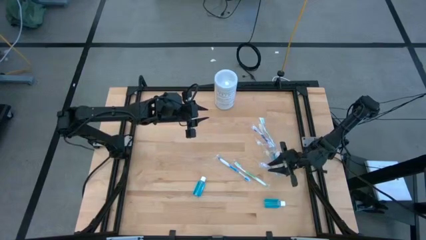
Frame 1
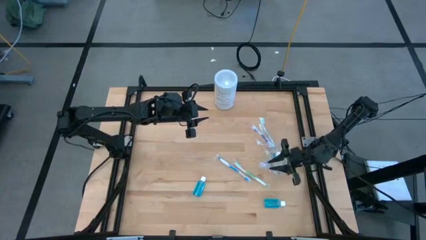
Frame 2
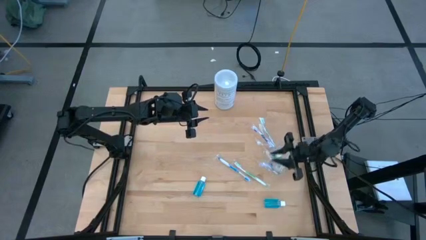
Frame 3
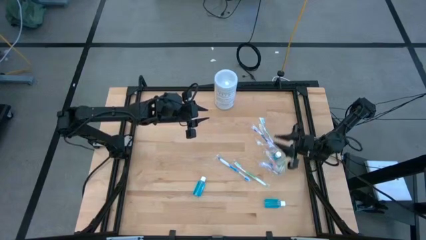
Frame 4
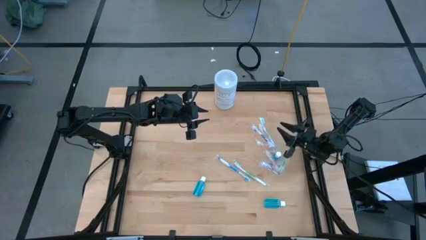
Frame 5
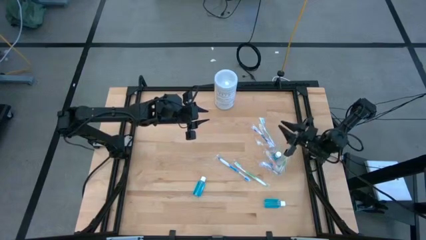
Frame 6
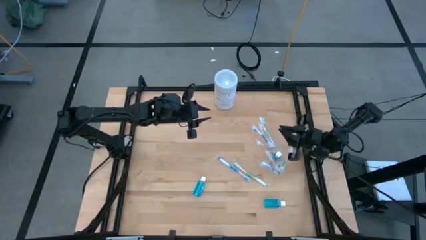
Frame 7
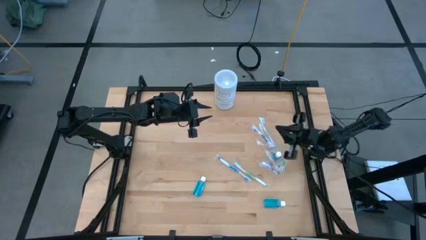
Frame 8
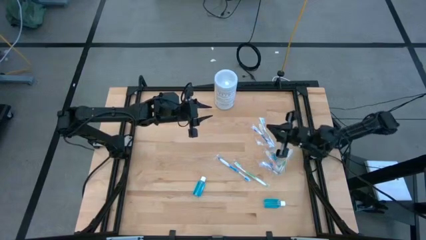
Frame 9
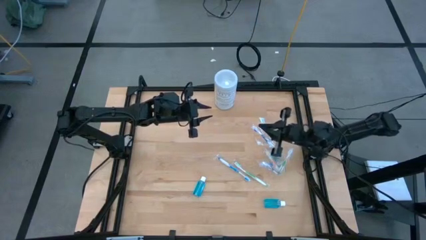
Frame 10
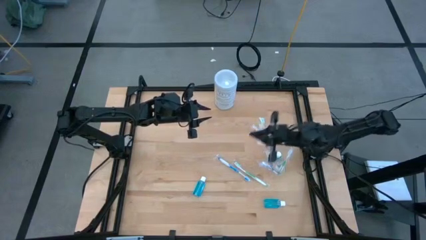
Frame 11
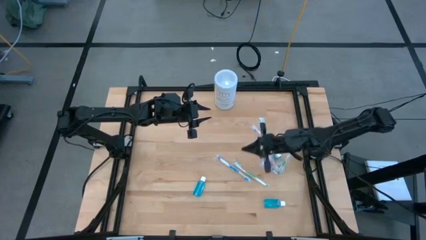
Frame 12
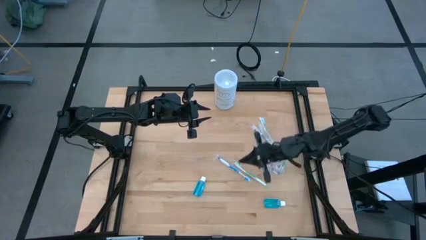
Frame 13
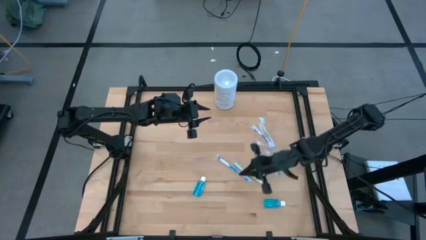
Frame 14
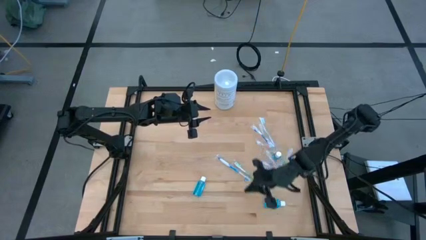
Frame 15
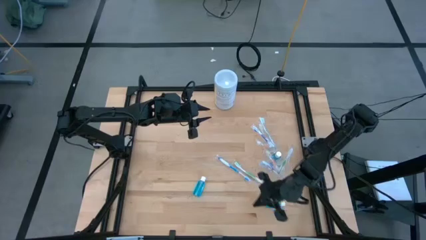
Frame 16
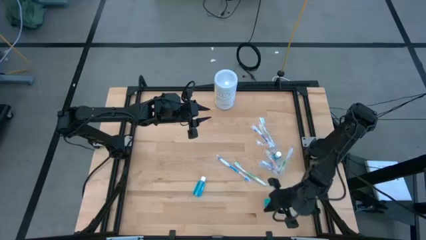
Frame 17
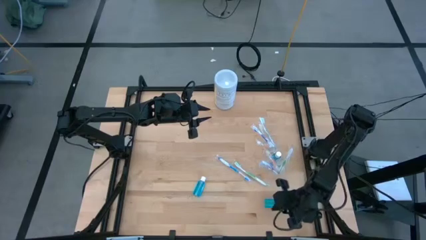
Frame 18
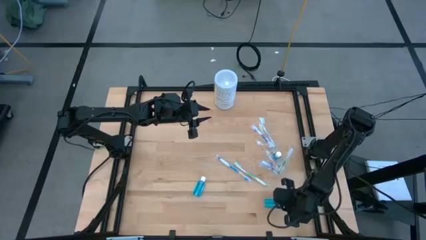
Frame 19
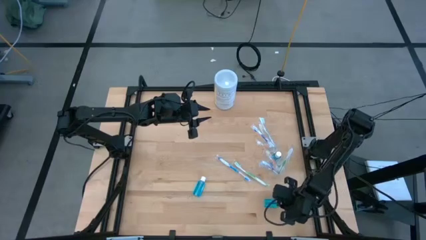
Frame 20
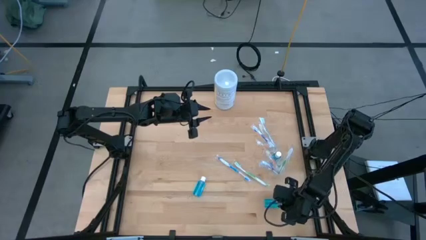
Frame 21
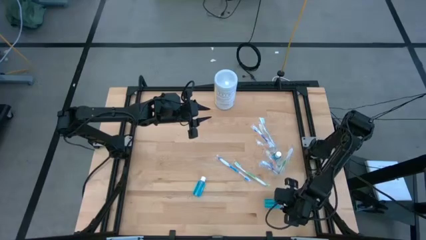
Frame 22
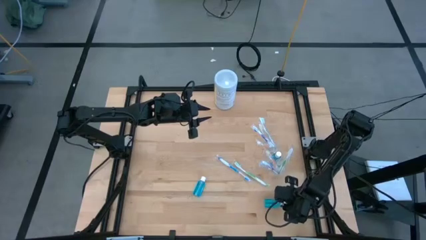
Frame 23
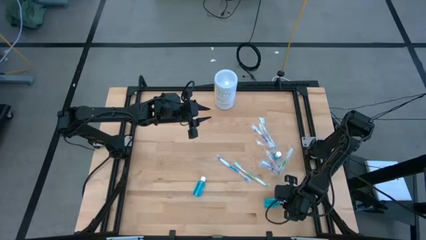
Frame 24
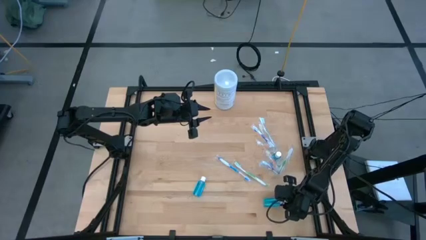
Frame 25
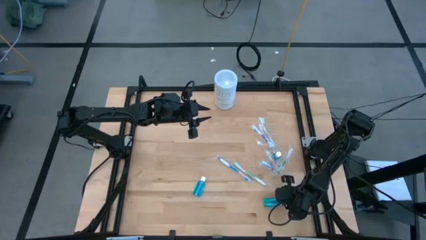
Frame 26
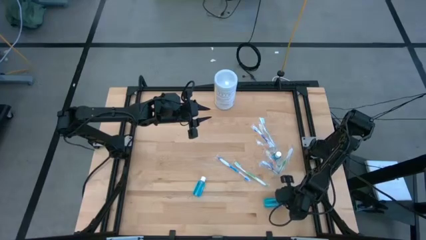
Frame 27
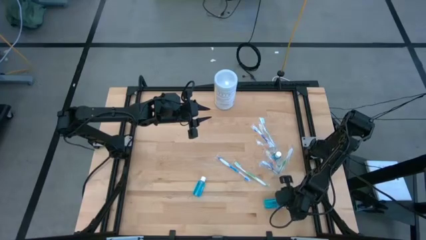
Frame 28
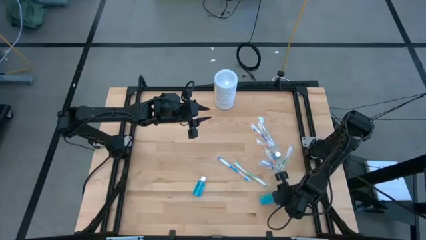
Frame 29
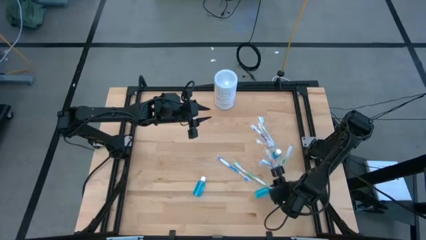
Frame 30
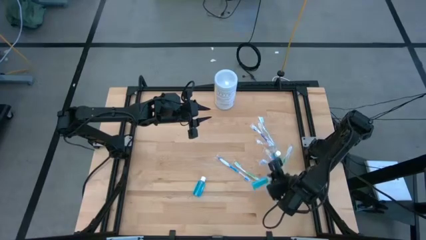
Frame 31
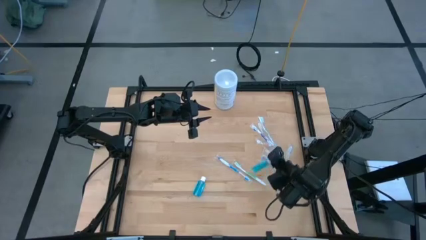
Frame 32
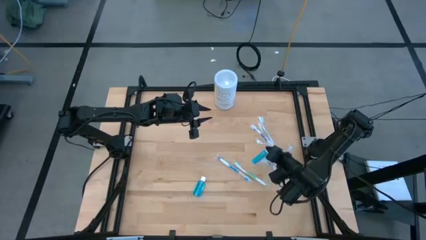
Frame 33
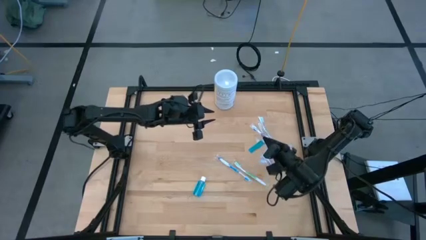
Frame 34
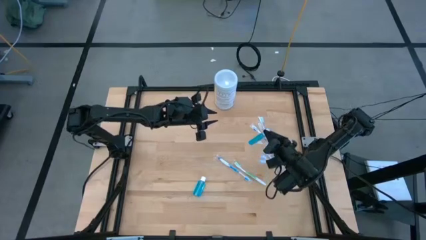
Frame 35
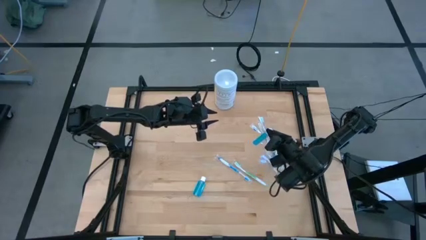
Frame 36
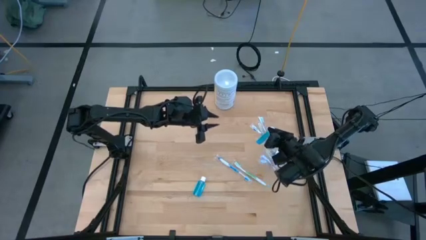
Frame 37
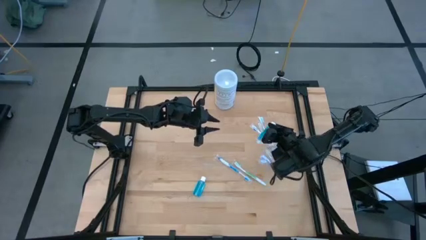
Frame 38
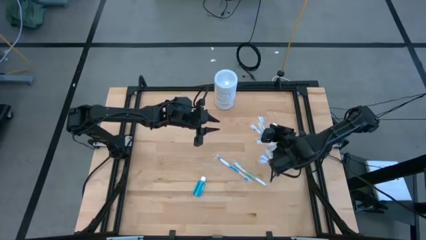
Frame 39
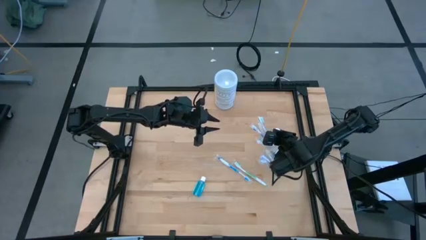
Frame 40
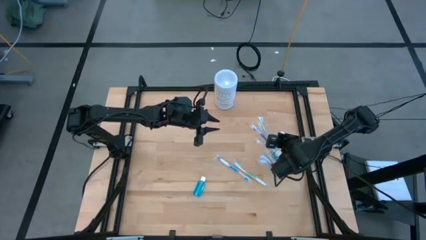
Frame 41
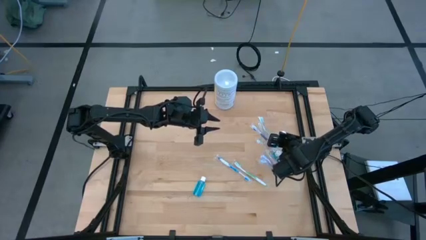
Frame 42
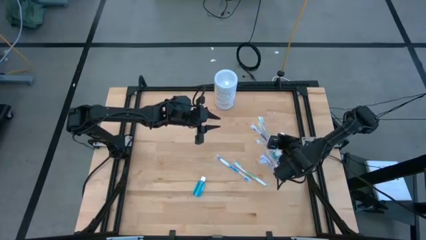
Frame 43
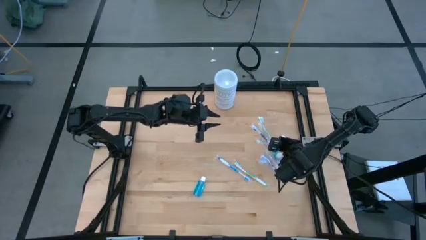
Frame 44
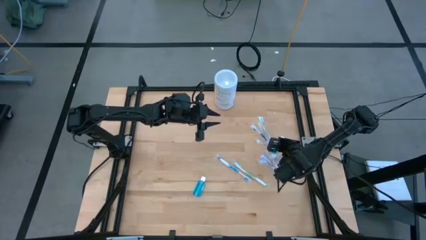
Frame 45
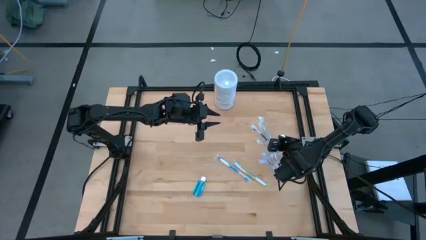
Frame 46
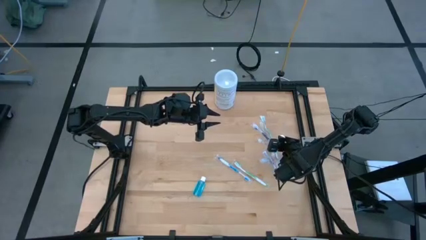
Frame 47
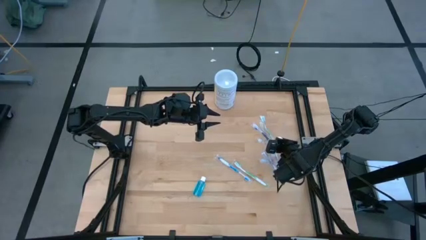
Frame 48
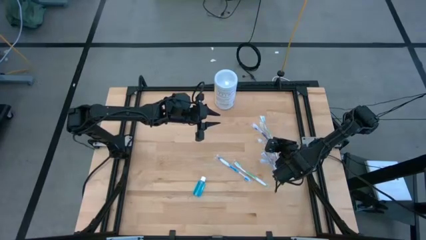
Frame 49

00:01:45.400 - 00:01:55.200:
Task: Pick & Place toothbrushing station
Put the right mouthwash into the transparent organizer
